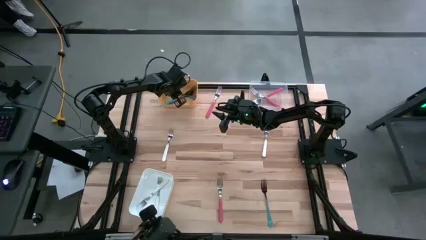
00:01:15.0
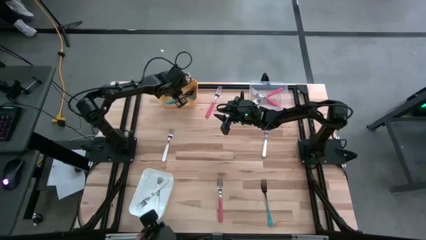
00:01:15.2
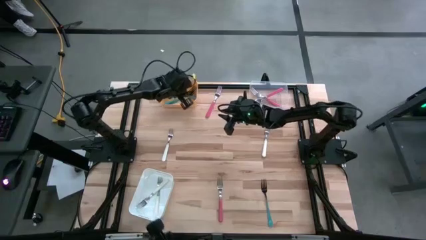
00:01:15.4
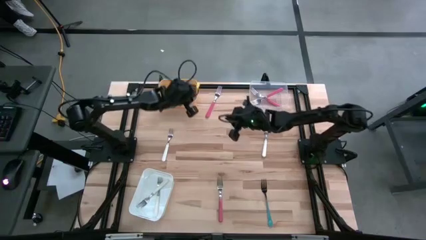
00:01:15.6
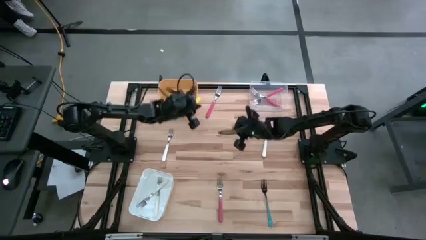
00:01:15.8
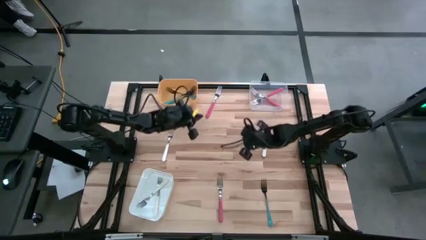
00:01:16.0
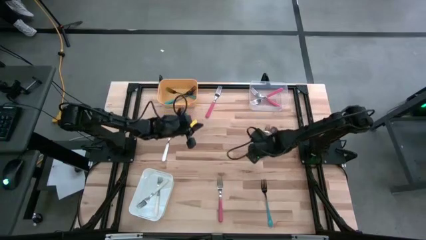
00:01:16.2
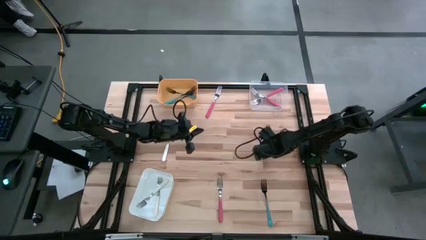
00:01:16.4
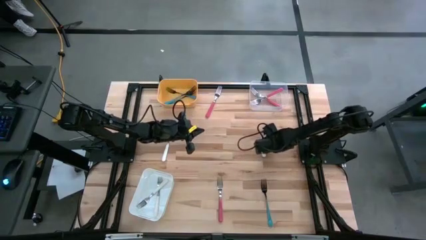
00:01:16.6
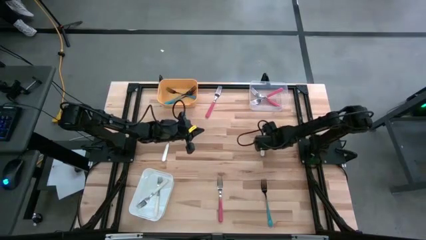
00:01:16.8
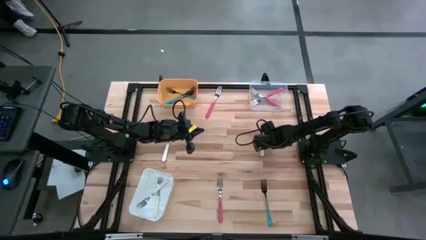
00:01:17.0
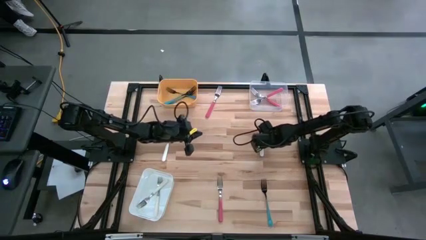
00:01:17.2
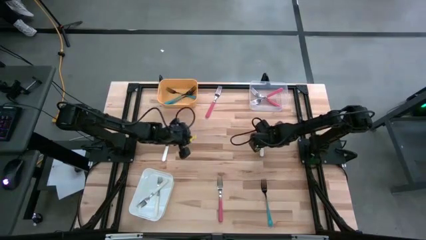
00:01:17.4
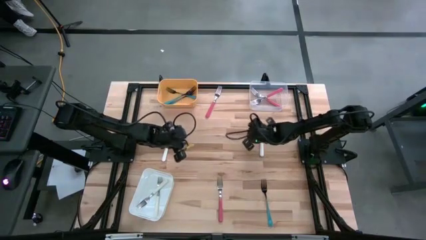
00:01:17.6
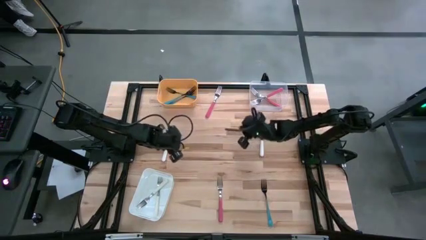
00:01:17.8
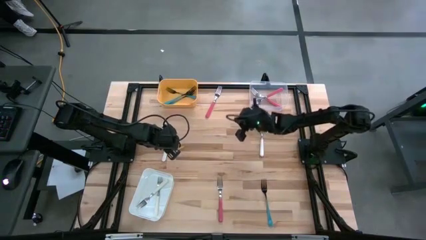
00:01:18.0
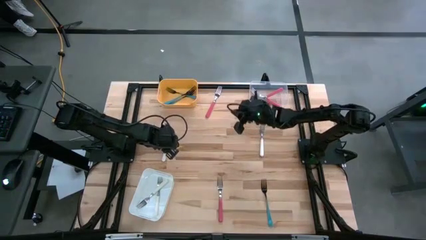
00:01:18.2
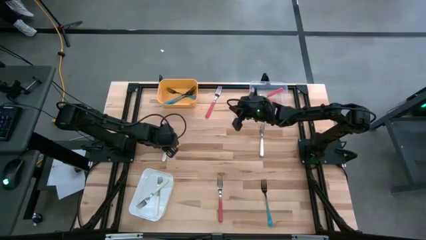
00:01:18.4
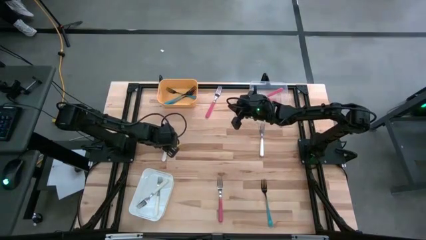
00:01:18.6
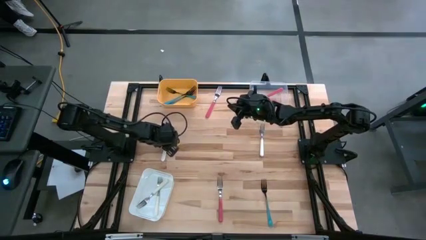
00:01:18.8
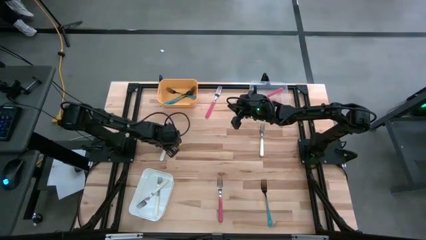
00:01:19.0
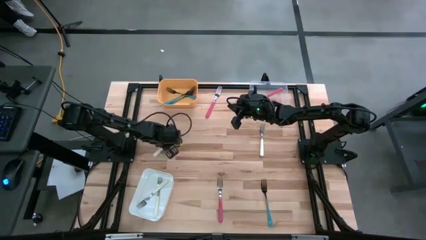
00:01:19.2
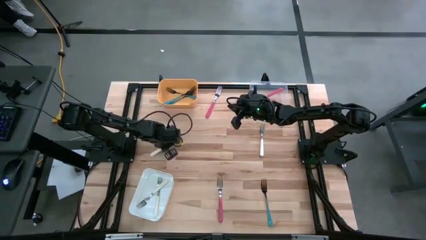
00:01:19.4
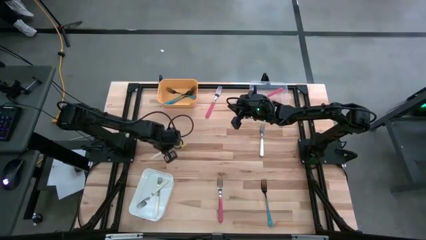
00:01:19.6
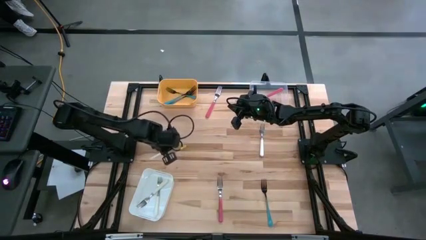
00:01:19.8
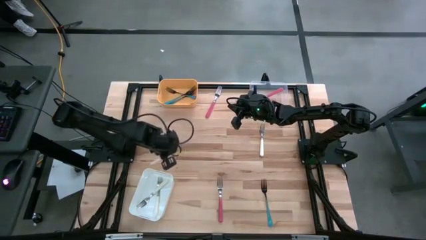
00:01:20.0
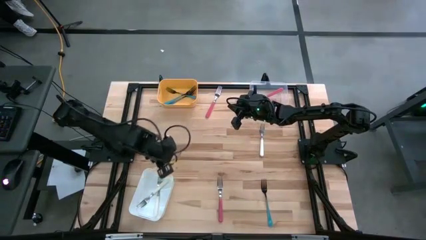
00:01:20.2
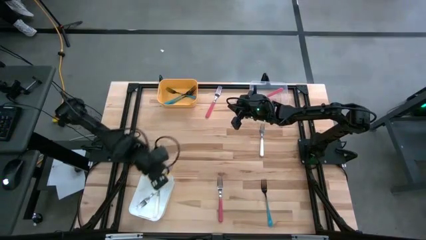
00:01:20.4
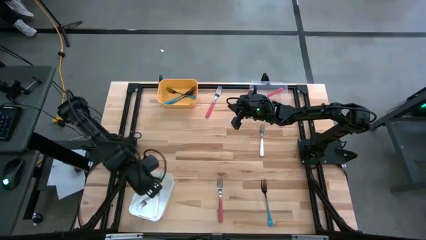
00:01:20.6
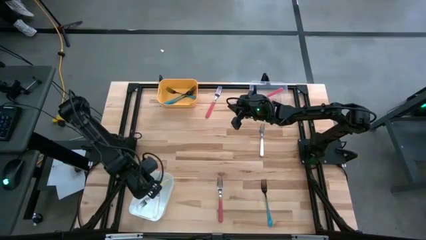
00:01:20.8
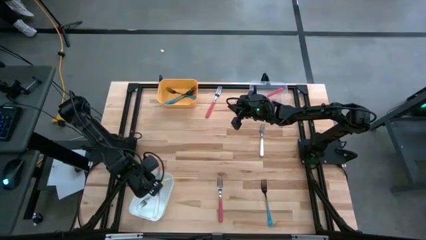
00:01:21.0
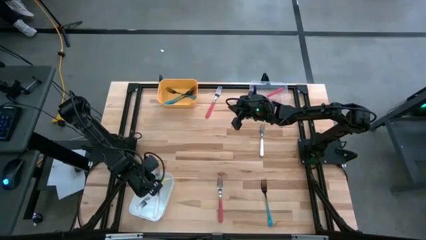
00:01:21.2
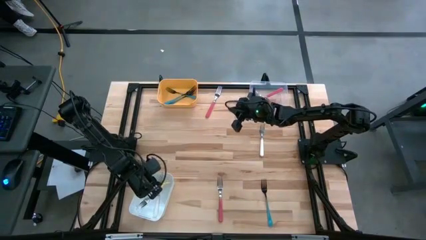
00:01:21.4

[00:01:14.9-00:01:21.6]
Task: Sort silverware by color (type)
Put the white fork into the white bin

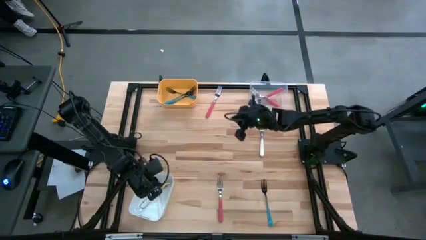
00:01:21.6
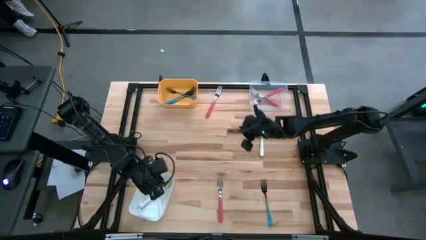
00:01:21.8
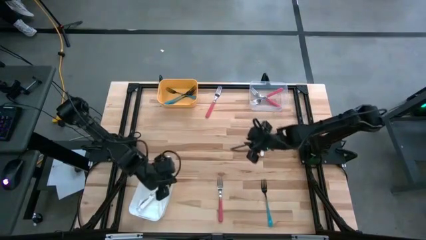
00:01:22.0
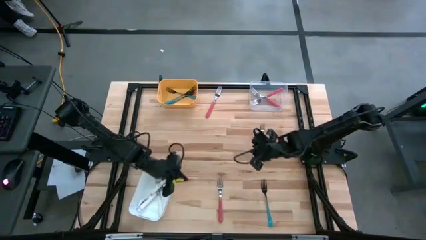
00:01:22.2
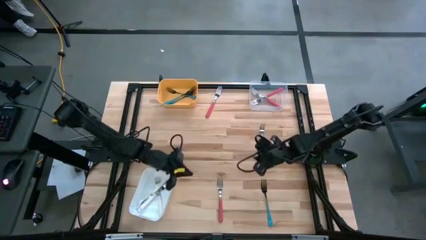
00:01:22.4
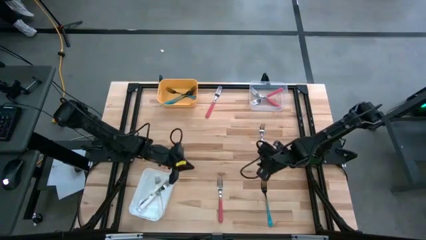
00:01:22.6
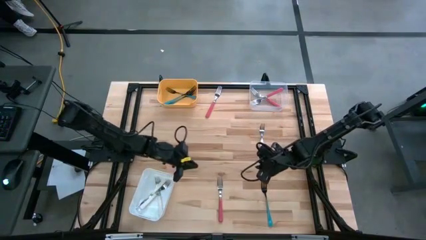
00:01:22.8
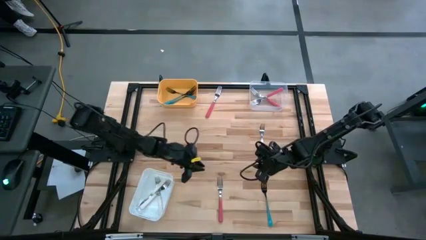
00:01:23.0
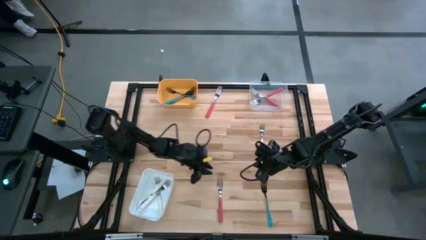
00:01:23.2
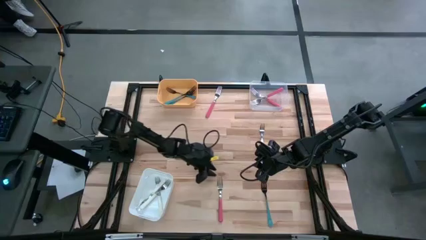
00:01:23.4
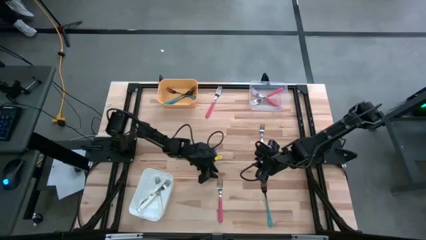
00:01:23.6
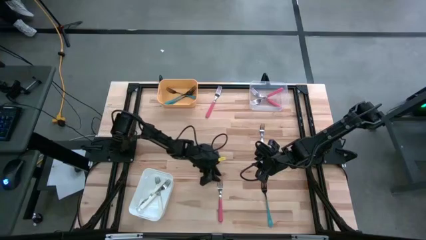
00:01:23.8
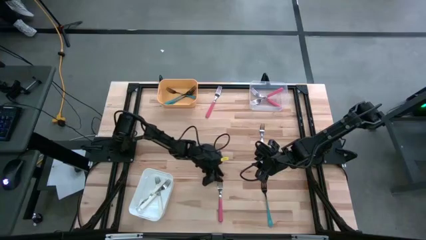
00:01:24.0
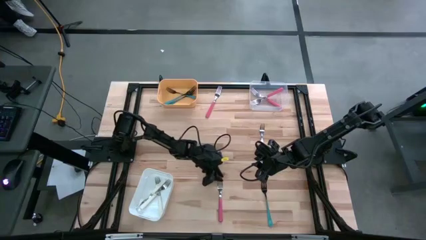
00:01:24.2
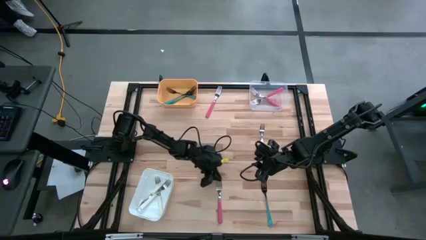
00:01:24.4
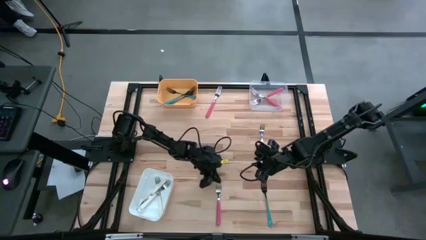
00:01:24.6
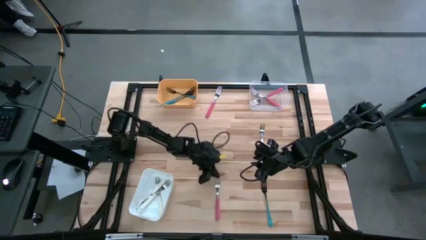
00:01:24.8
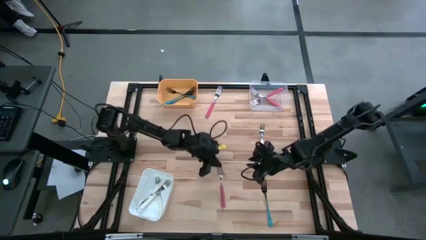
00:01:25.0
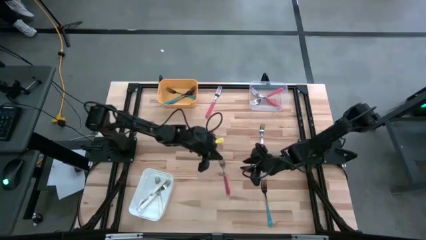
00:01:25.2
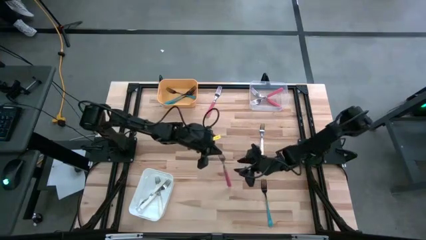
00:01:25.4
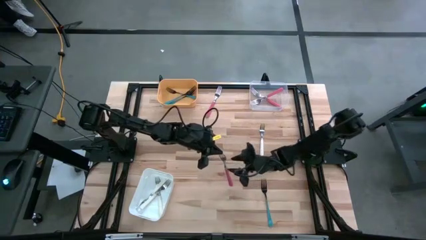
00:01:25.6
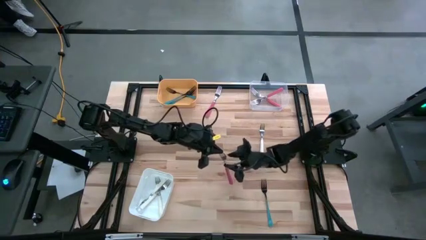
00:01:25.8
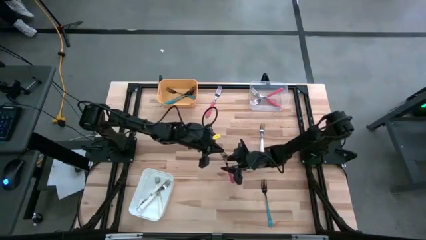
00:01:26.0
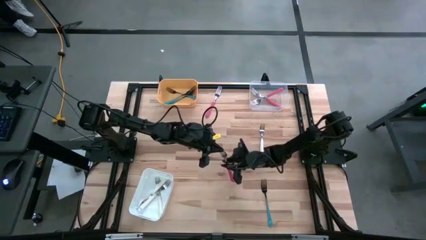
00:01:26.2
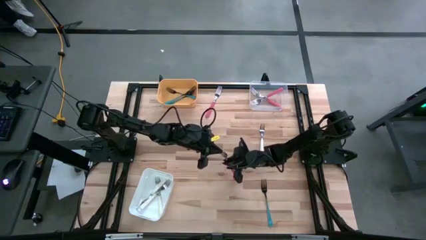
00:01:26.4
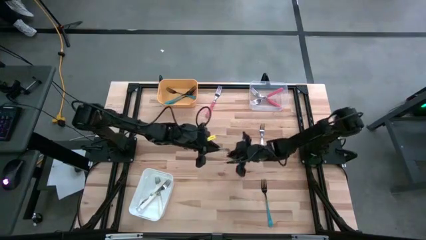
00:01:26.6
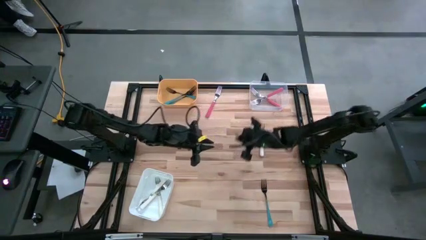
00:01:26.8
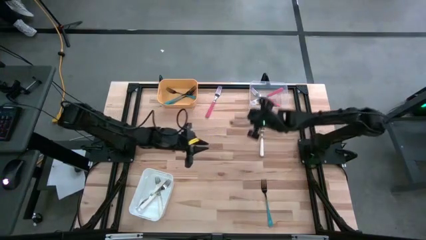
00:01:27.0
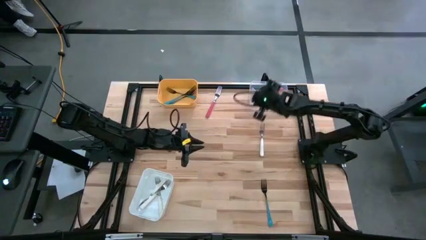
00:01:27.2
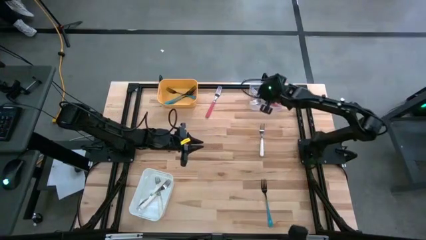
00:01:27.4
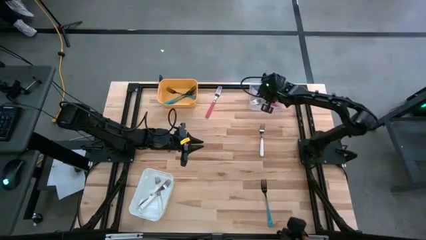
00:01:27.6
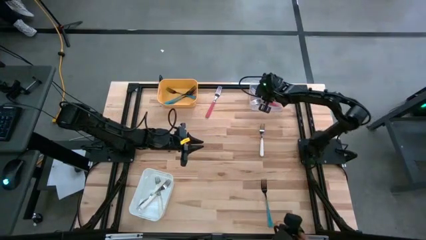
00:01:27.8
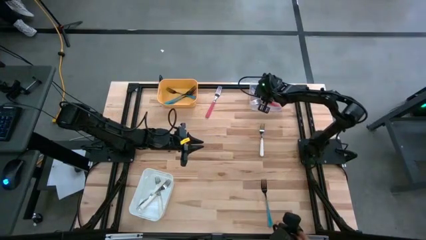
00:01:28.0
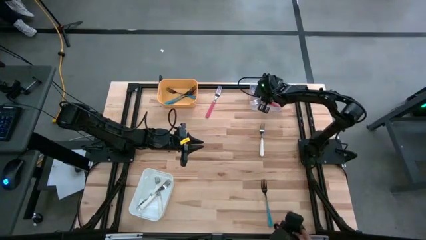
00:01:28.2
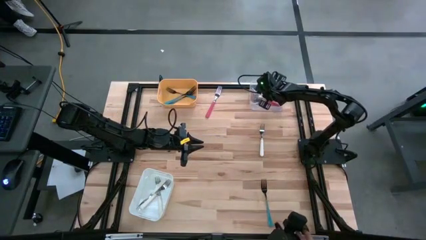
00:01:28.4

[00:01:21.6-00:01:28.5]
Put the pink fork into the transparent bin

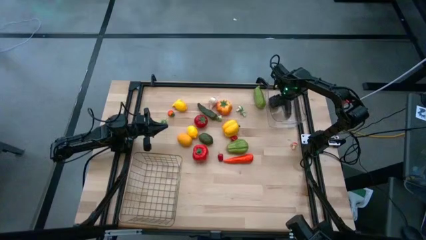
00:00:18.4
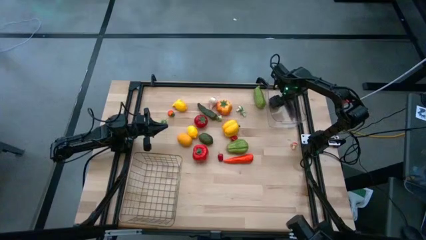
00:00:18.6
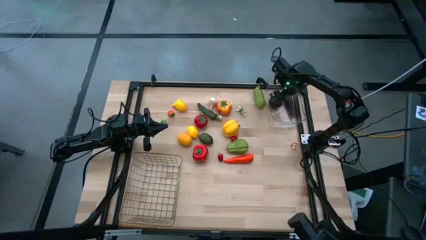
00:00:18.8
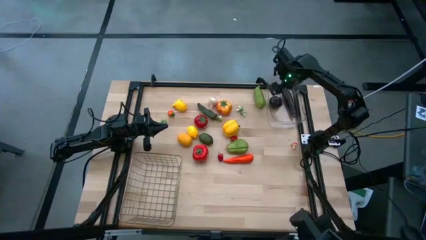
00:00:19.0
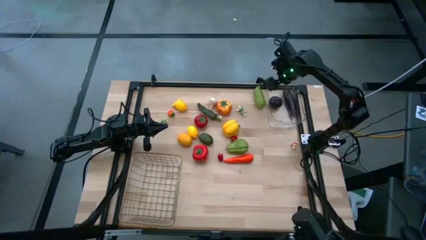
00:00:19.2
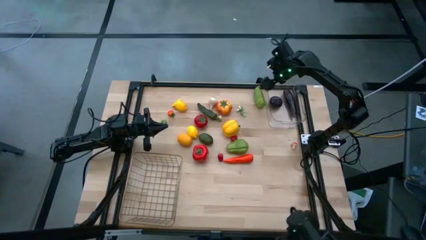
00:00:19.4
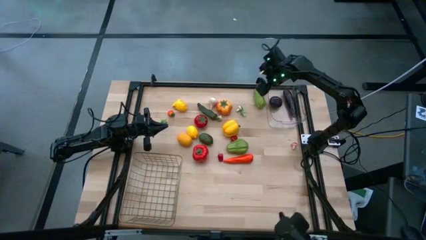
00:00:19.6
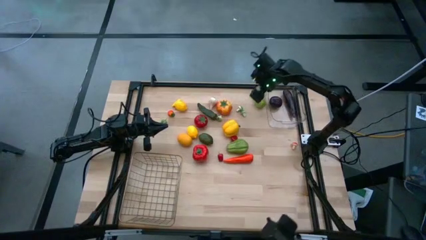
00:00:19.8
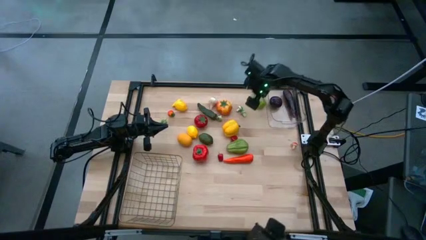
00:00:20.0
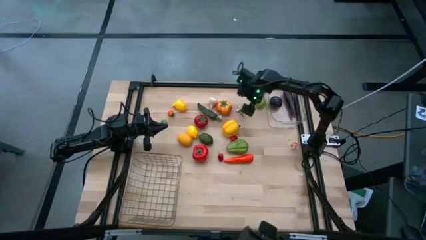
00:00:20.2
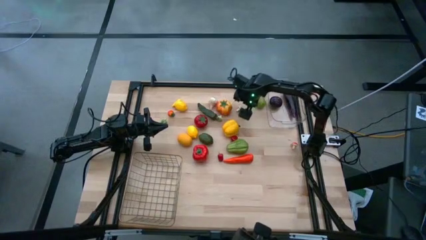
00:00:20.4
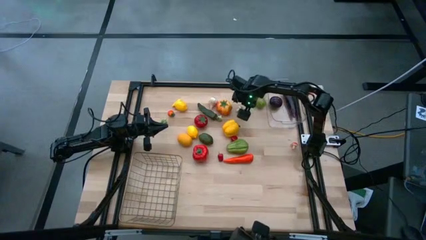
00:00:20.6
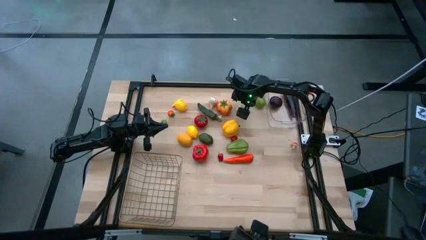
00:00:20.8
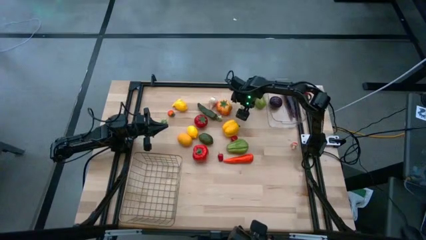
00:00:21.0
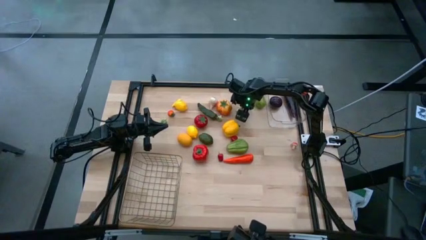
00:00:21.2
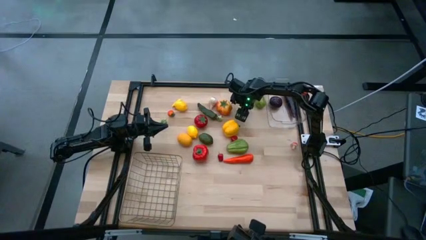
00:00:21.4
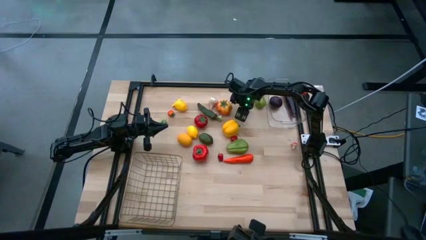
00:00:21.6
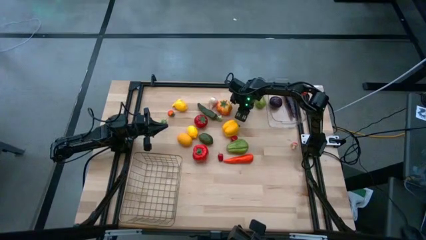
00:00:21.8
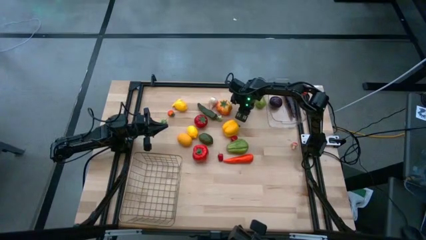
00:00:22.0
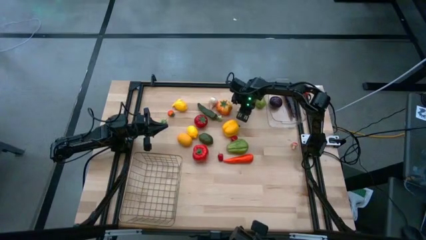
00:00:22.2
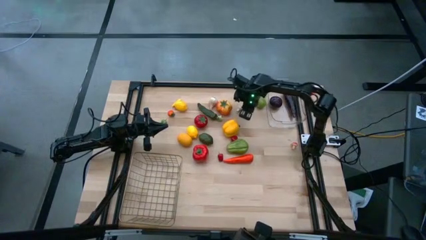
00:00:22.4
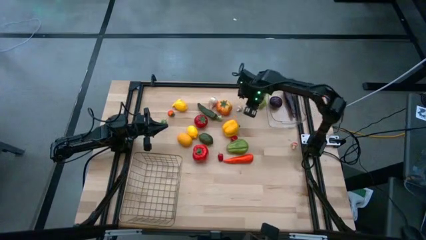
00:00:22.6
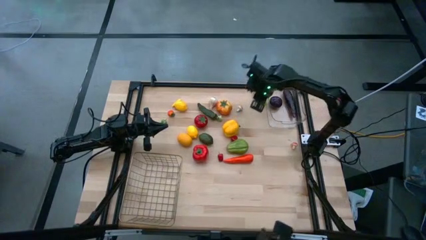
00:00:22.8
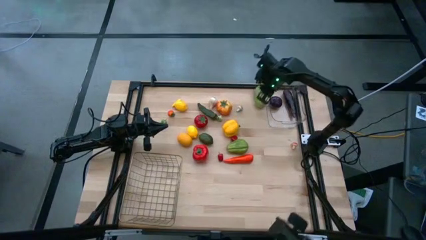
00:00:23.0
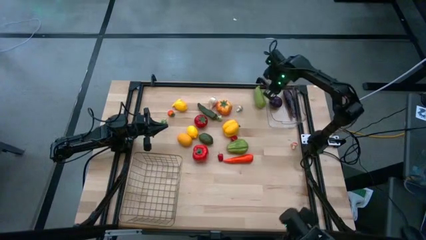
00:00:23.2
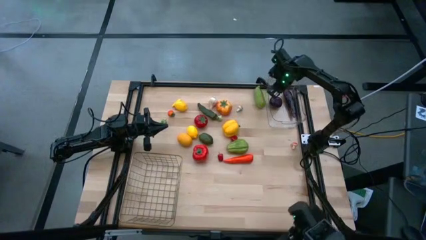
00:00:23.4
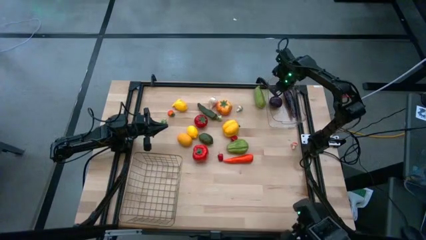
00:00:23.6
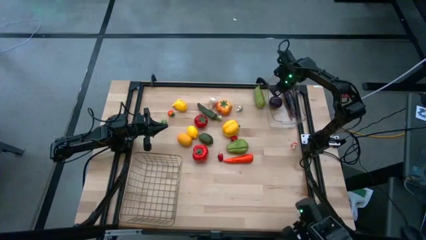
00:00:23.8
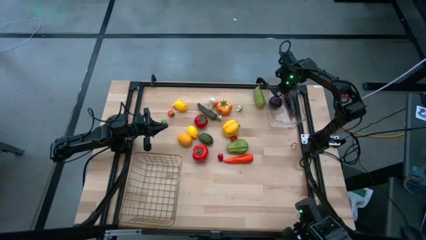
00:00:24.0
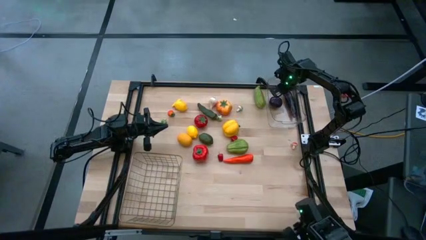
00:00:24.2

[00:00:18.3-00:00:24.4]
Task: Sort produce into baskets
Put the right green mushroom into the transparent bin
